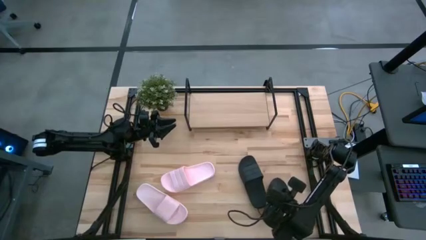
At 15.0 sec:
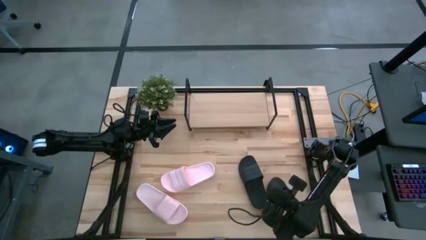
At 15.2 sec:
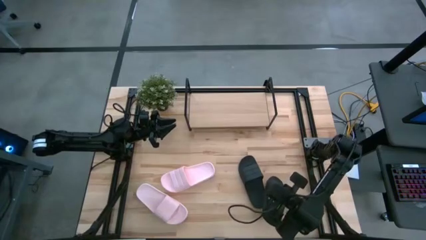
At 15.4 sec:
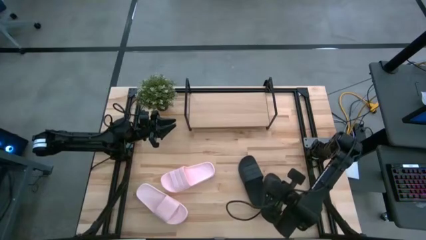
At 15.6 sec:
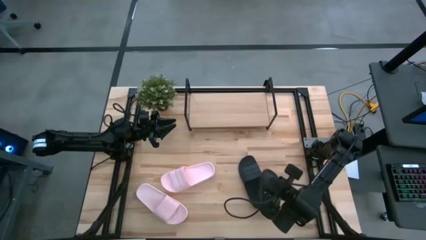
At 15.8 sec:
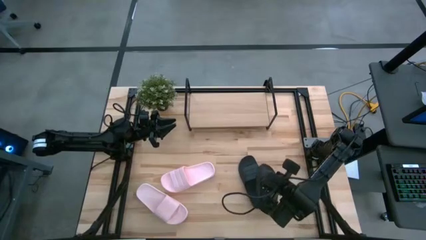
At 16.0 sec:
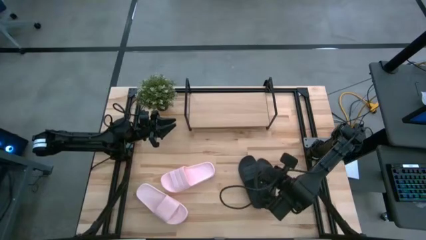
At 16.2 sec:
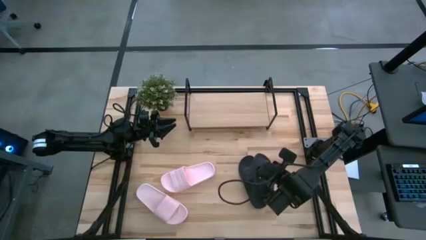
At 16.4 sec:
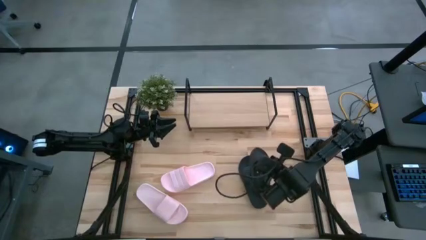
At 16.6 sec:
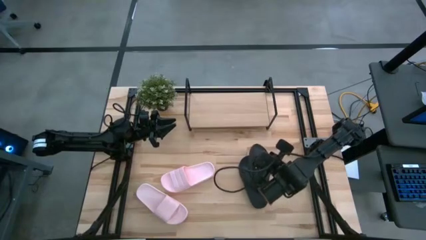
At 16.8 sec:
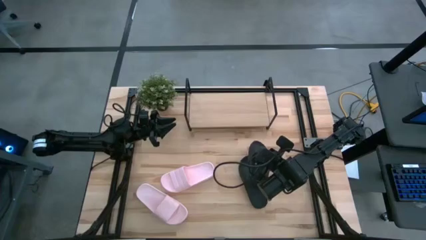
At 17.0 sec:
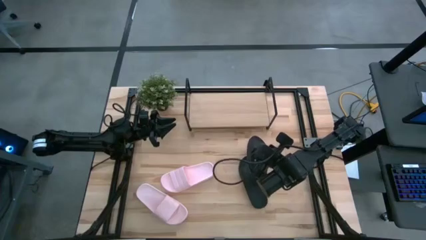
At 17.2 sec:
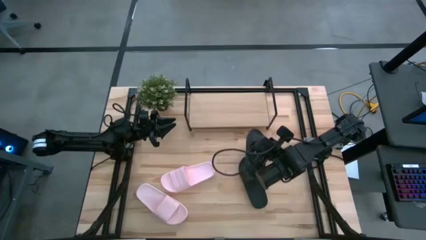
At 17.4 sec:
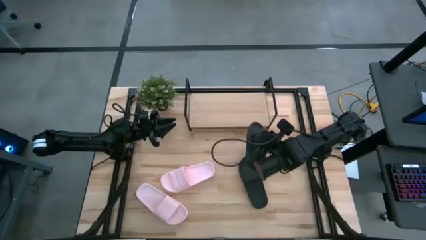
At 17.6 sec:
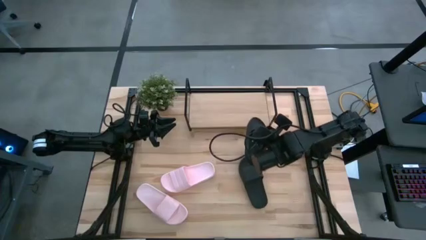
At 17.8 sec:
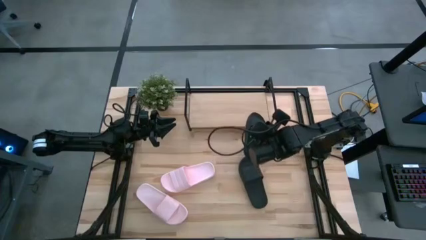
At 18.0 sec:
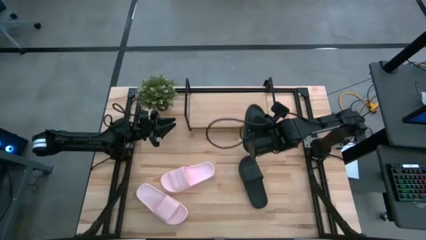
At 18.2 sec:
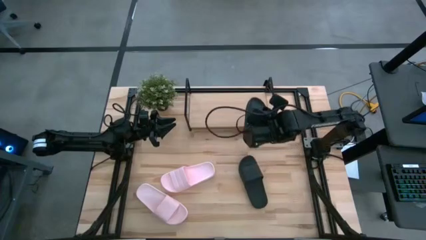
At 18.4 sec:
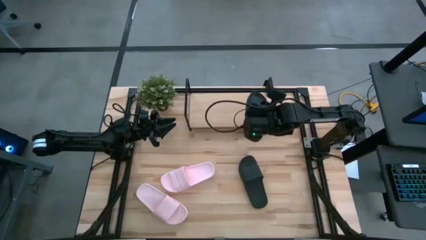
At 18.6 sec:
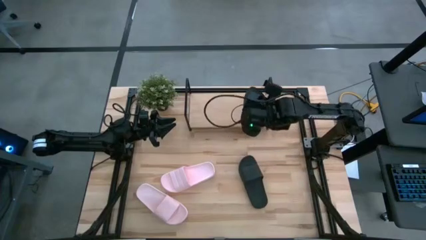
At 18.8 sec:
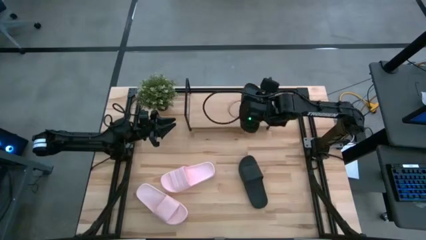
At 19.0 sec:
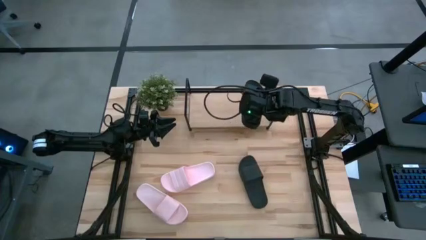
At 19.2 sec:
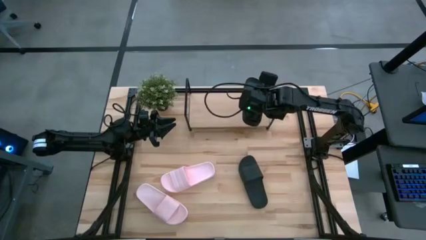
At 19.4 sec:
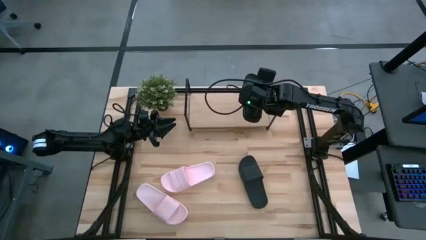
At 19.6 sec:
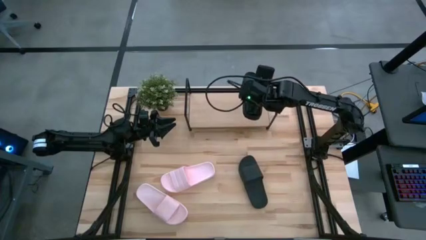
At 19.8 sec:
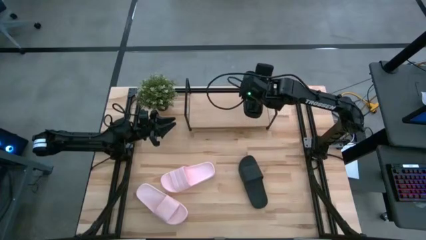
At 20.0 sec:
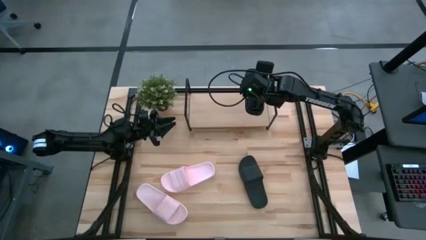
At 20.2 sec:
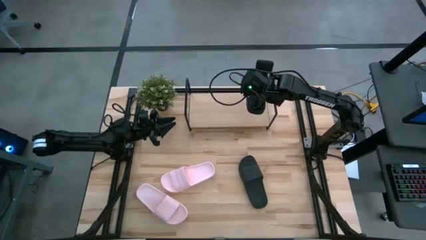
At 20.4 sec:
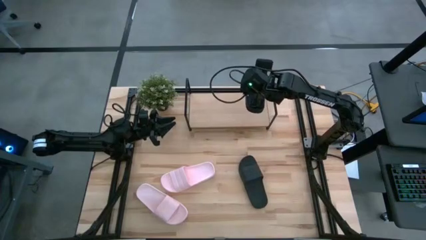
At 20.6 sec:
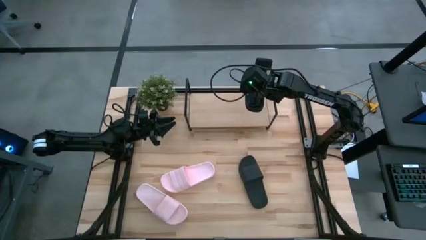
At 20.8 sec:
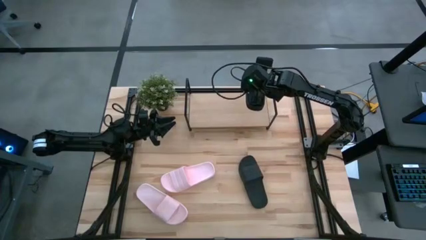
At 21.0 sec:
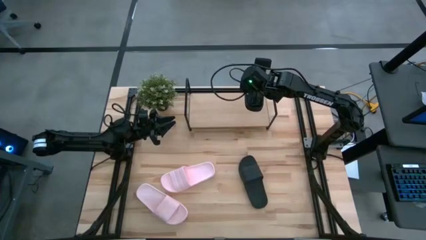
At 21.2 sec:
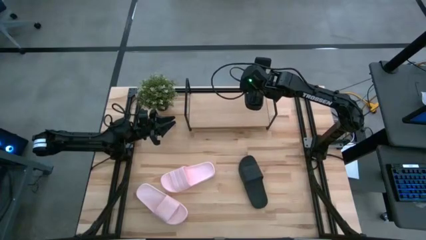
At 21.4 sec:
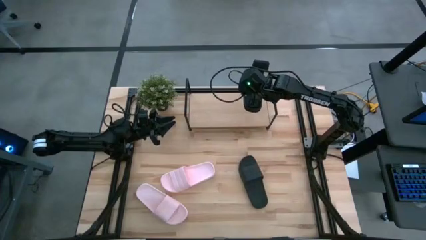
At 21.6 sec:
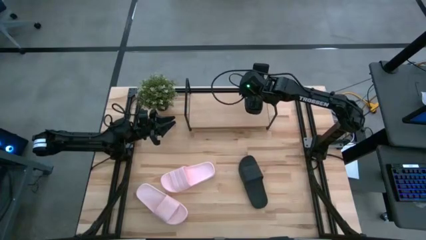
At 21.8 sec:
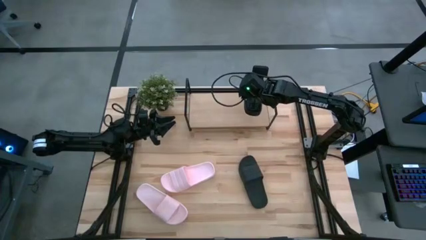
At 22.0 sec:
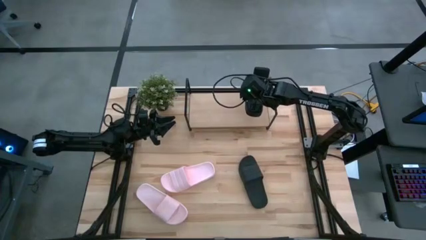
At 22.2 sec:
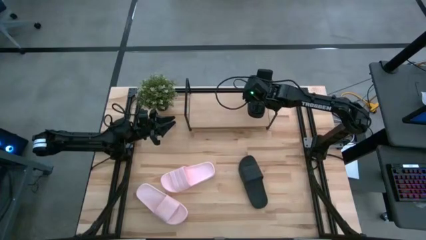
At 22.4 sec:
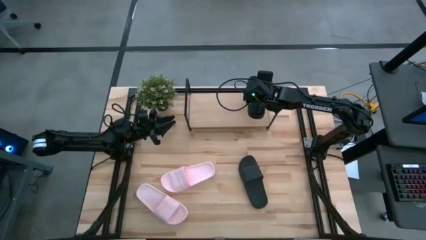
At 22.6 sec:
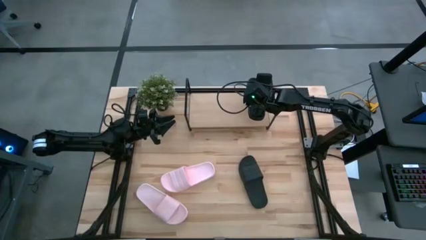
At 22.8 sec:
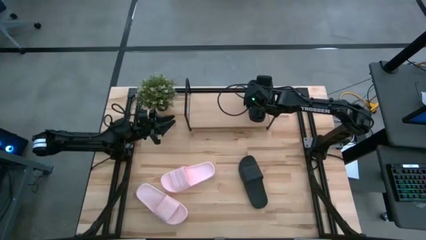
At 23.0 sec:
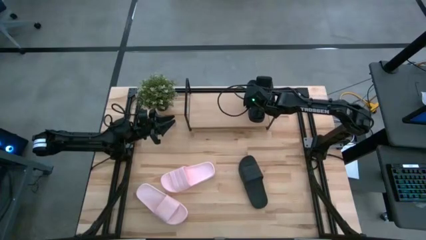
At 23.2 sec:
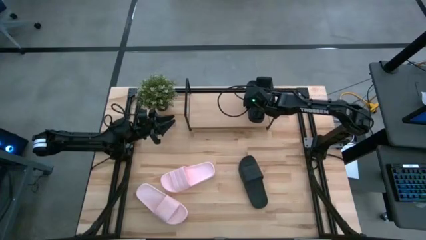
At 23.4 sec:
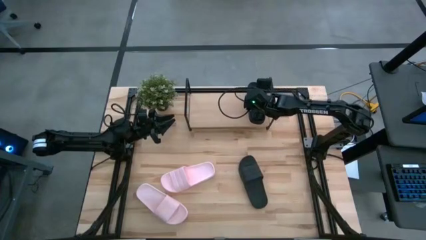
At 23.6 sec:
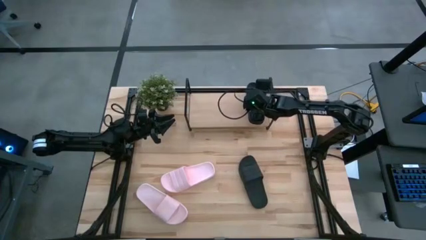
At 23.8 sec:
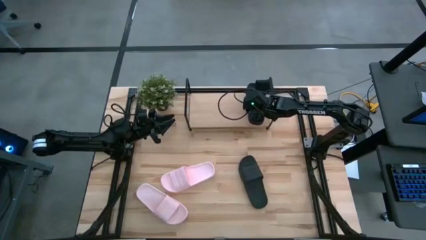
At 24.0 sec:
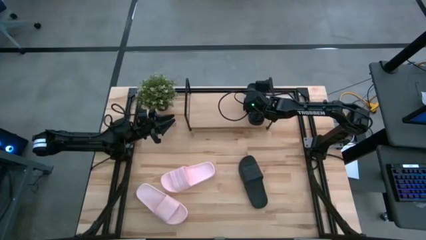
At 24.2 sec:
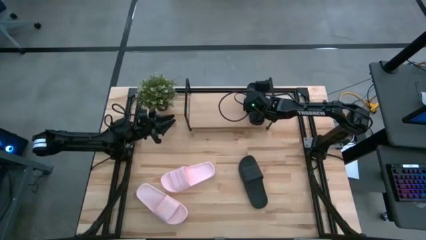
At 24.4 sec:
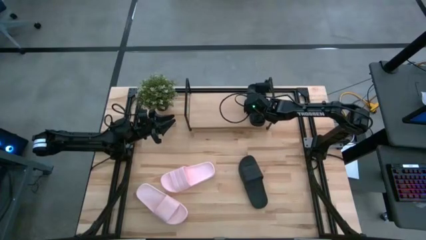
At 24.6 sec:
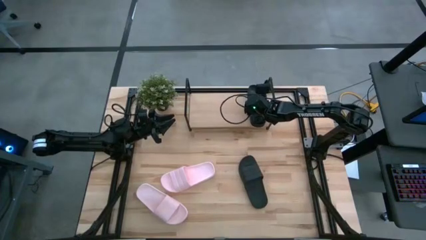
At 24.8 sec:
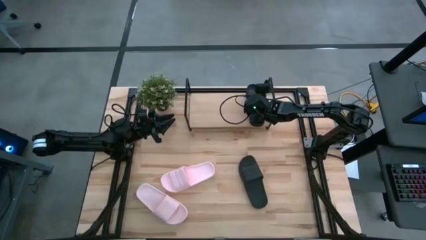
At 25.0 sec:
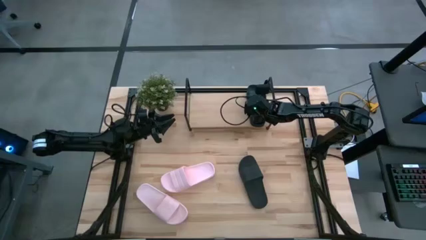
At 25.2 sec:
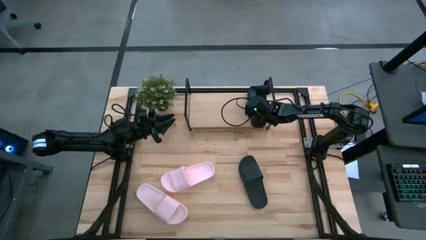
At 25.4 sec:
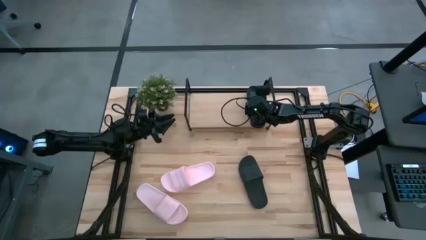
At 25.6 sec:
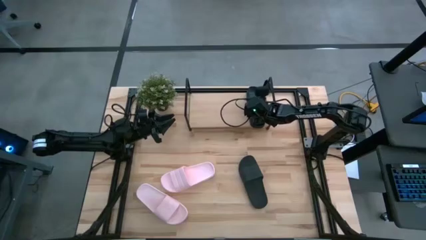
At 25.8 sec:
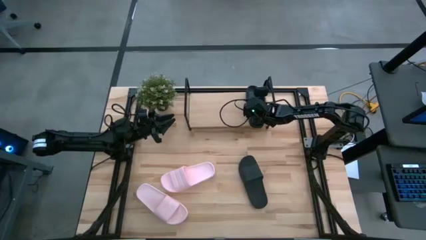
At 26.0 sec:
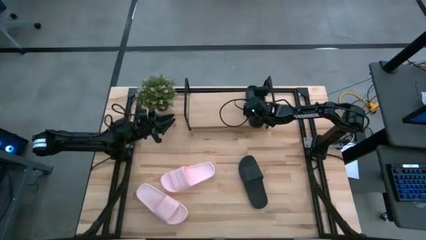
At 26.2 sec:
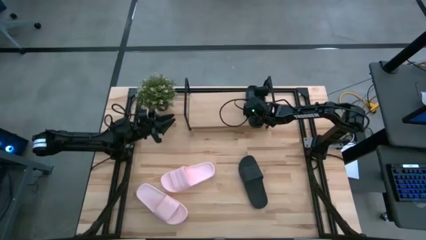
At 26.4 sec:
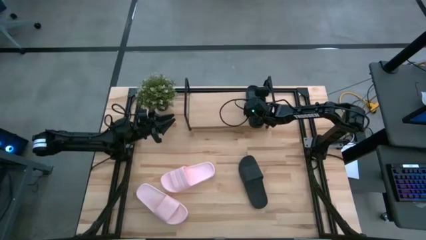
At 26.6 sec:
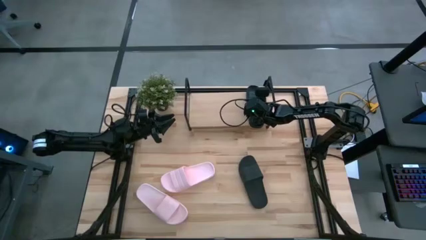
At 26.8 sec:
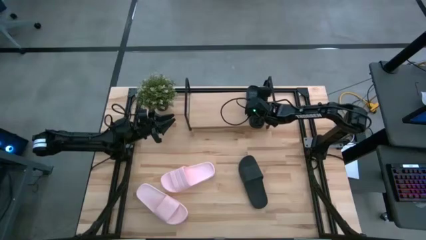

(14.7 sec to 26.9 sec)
Task: Pick and place slides into the shelf
Put the right black slipper on the shelf
